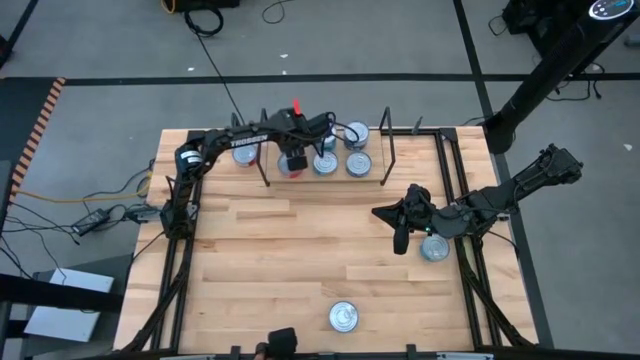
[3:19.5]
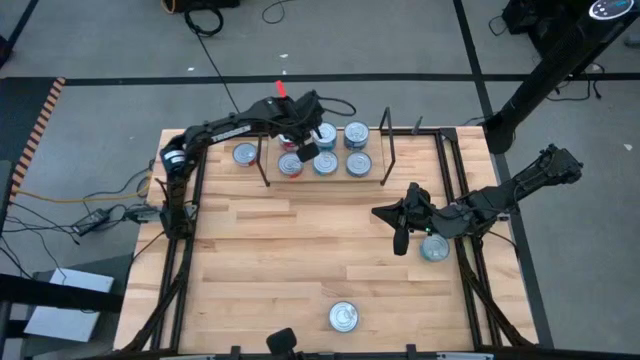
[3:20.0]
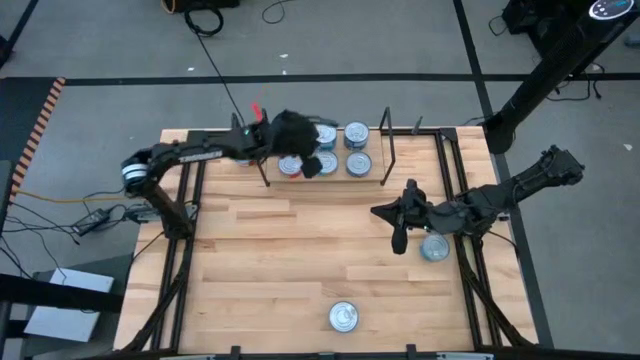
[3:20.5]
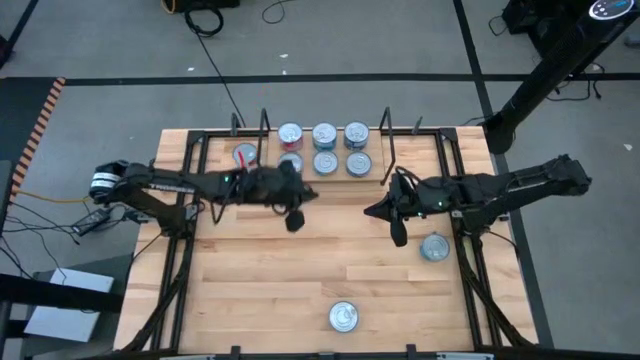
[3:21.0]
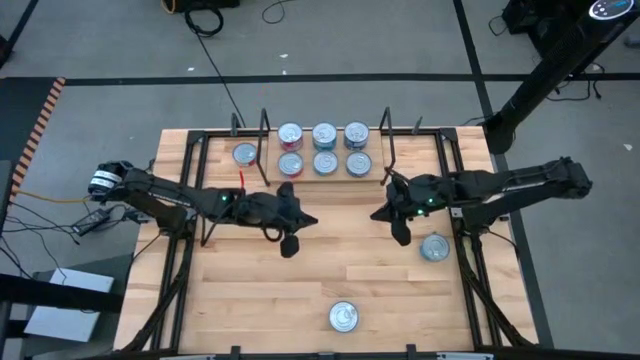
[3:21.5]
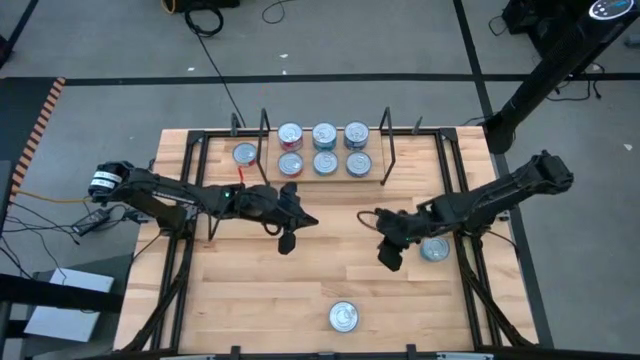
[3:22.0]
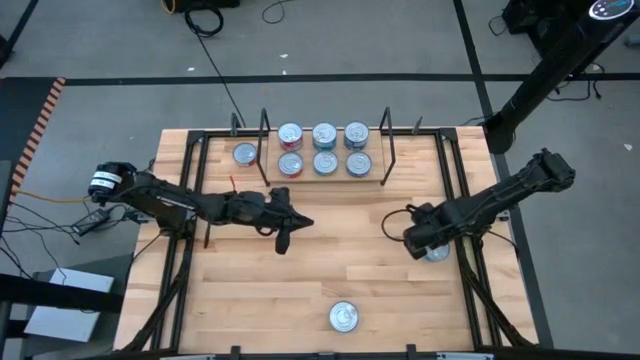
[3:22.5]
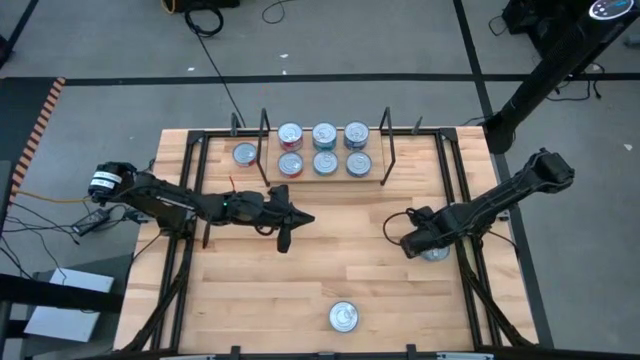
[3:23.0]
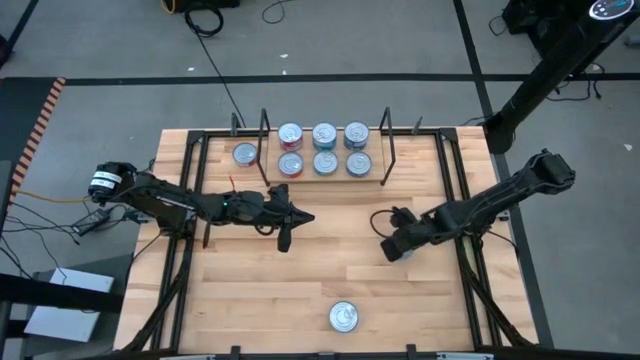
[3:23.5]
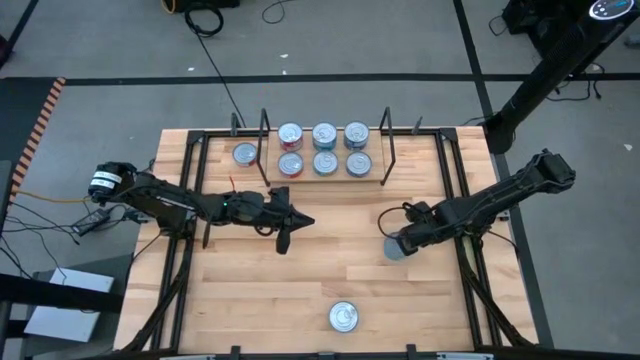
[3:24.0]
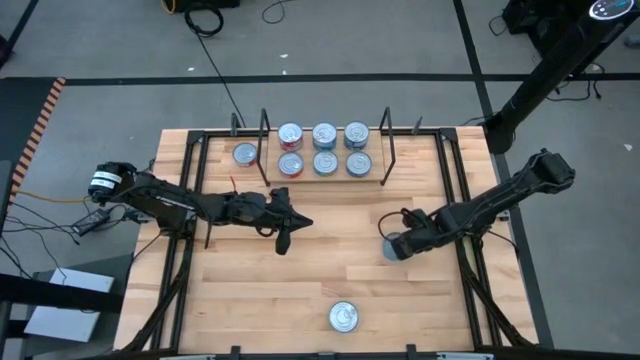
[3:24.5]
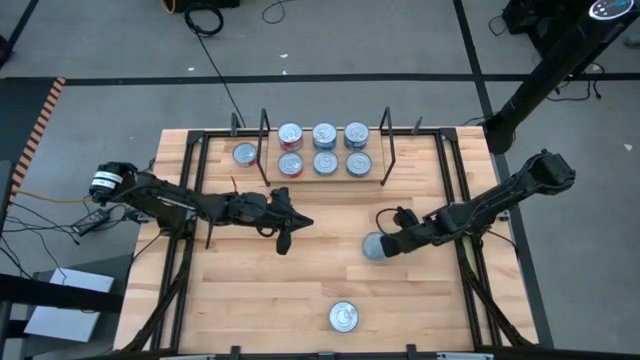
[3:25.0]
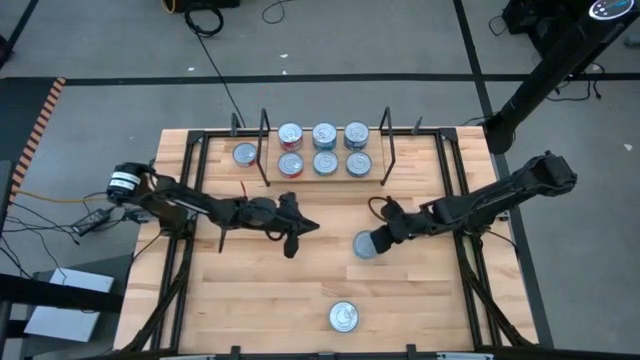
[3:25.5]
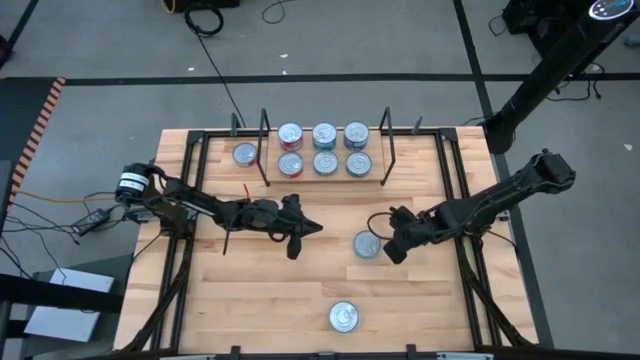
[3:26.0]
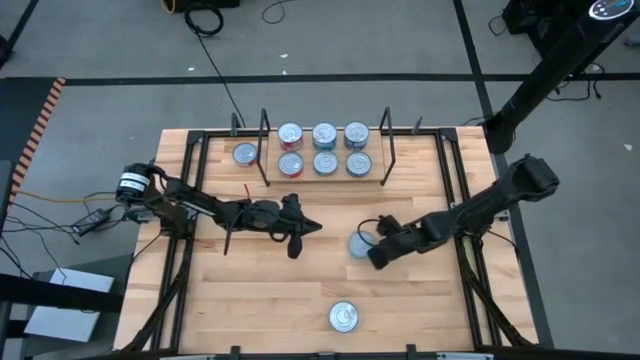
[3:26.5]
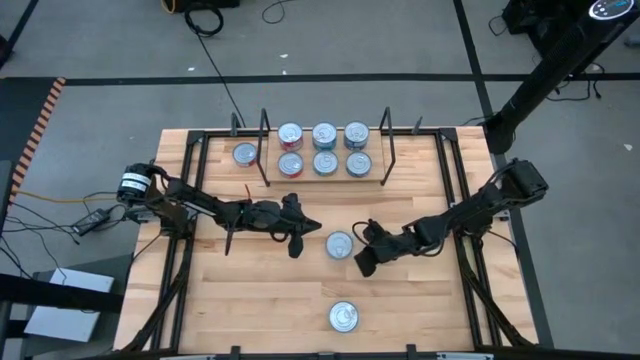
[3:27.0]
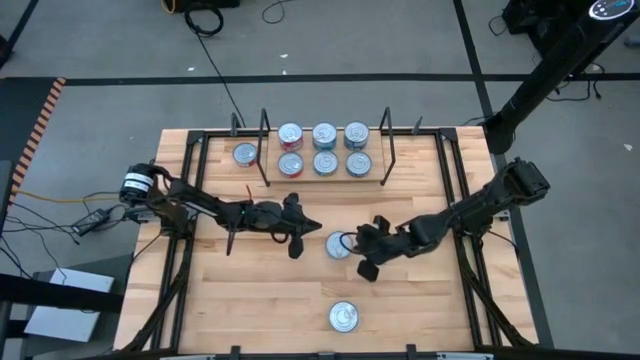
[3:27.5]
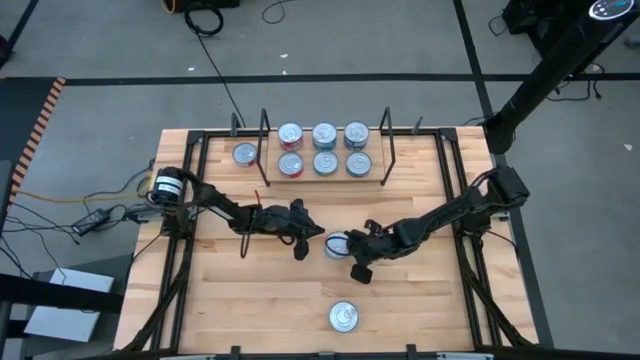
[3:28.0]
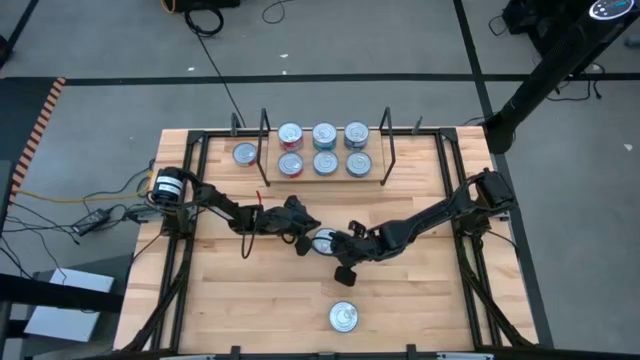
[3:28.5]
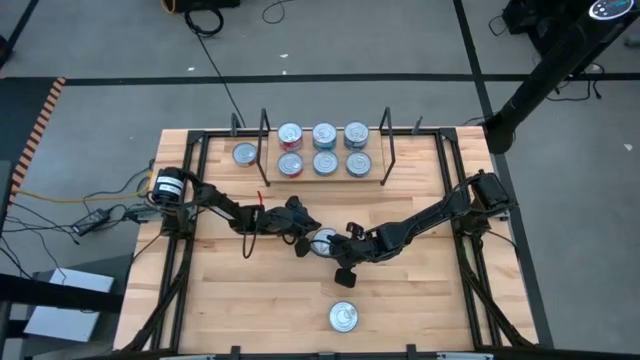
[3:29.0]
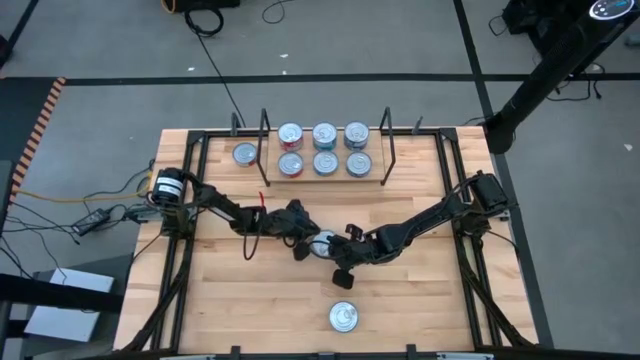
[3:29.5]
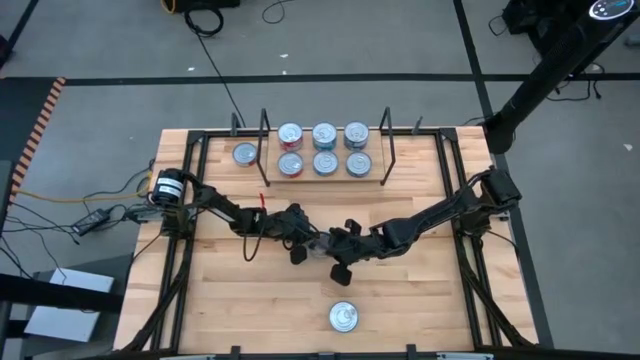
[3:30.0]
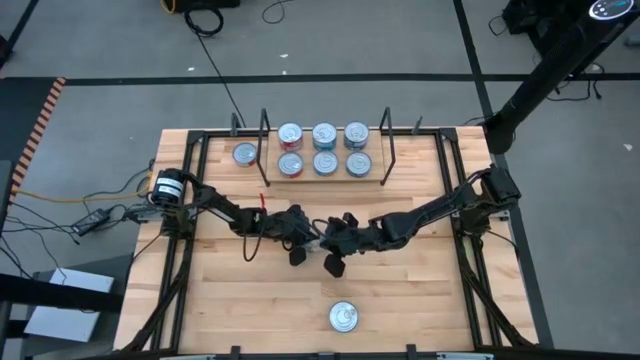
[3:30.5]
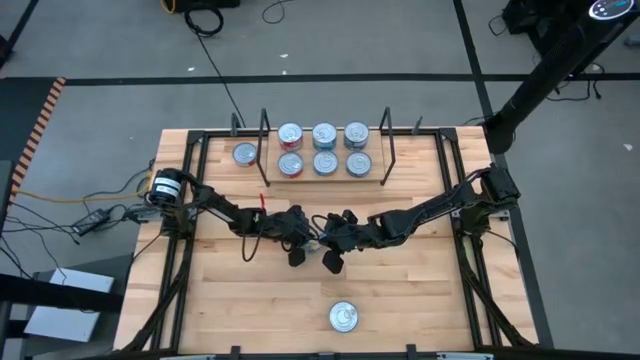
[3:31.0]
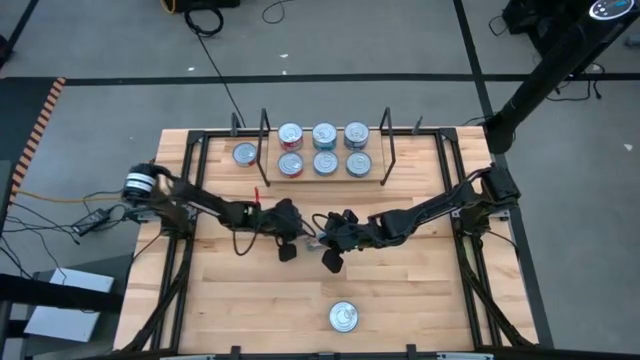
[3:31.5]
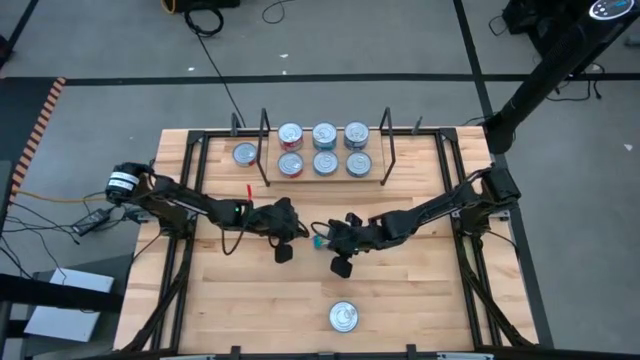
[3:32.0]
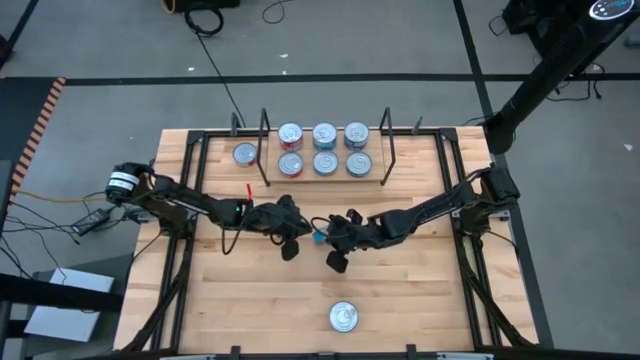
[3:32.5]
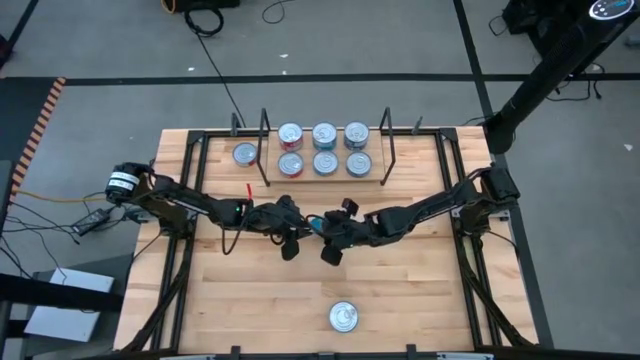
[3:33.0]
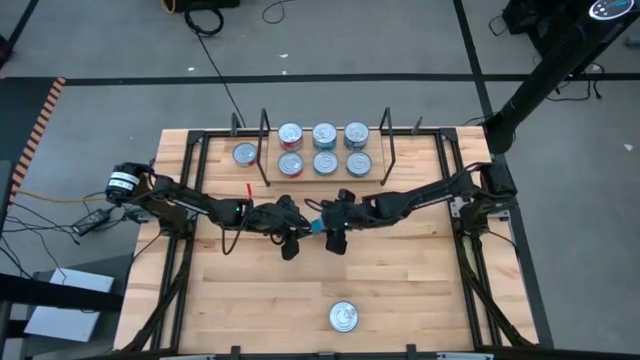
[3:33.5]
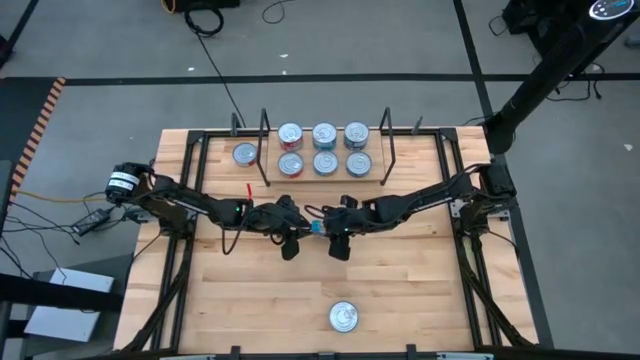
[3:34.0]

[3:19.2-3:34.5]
Task: Stack canned seafood by type on shelf
Stack the light blue tuna can on top of the other light blue tuna can

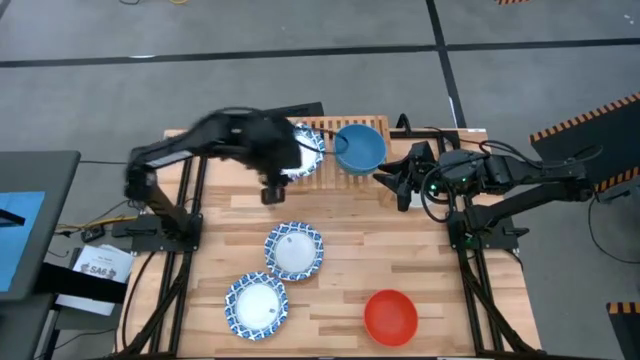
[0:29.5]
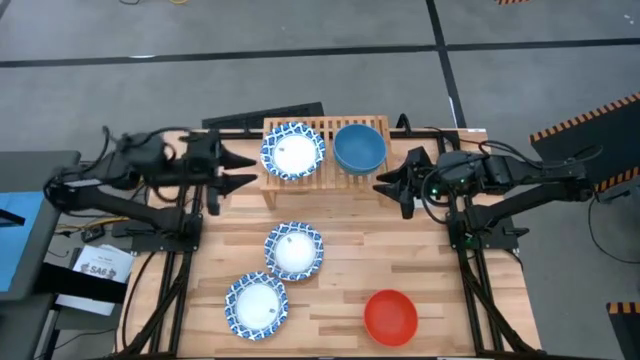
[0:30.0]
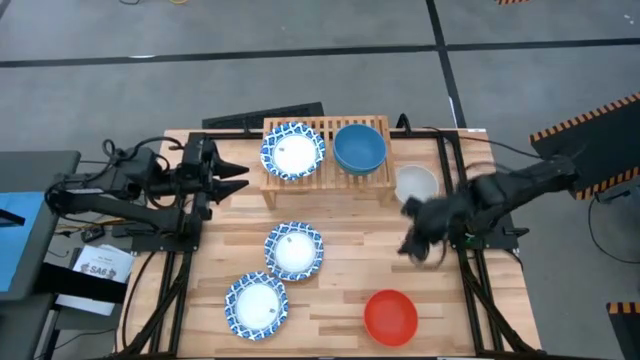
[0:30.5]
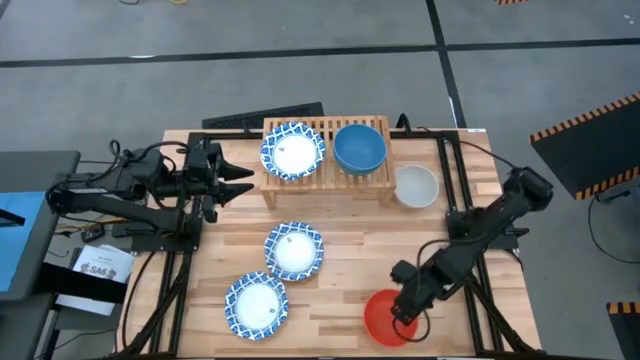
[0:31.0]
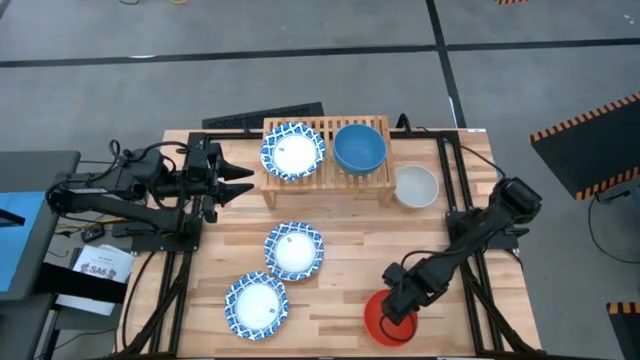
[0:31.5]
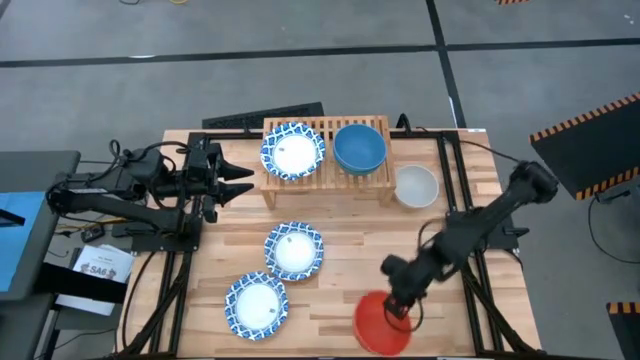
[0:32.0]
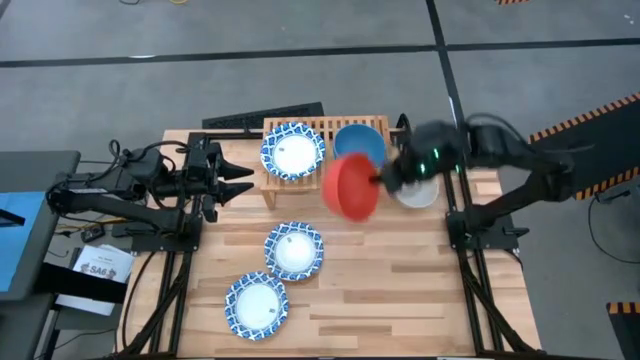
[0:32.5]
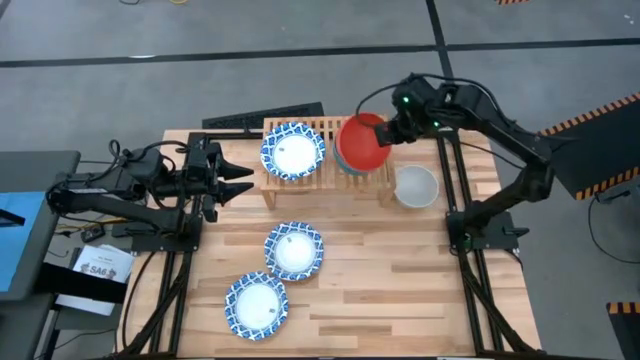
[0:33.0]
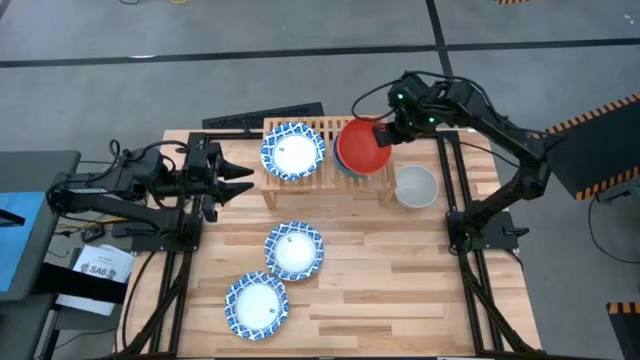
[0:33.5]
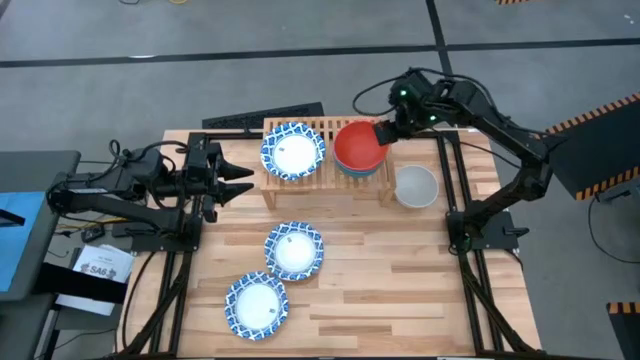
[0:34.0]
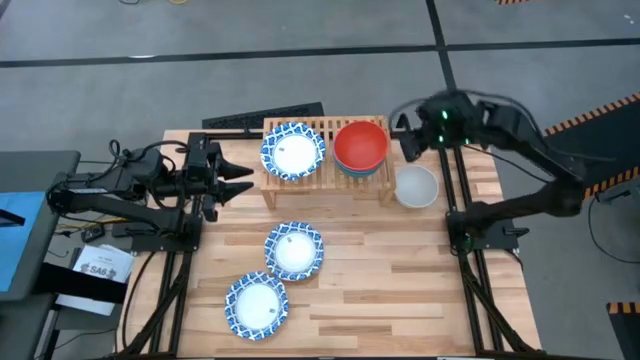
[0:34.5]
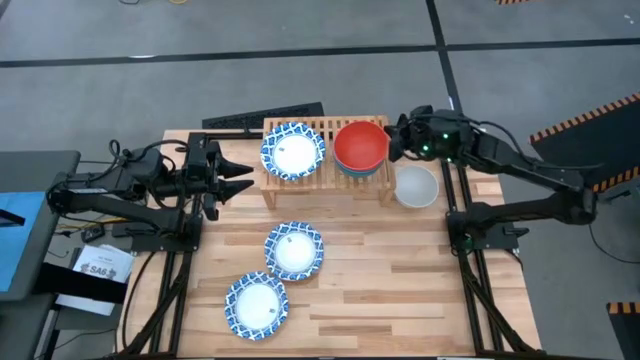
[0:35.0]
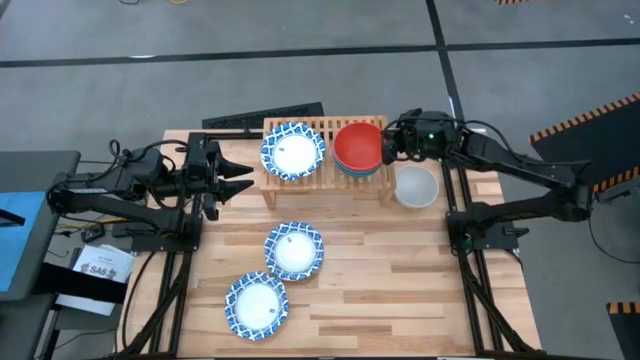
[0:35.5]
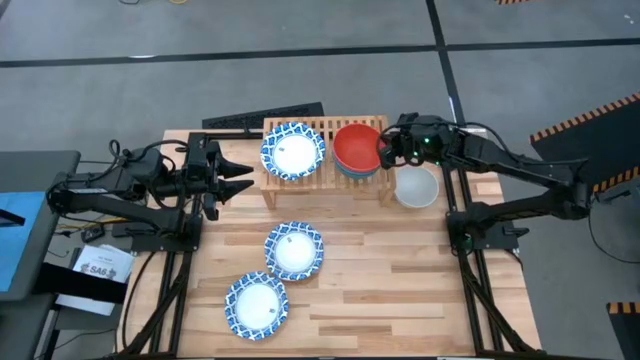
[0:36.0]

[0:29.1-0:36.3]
Task: Place and stack bowls onto a shelf
Stack the orange bowl on top of the blue bowl on the shelf

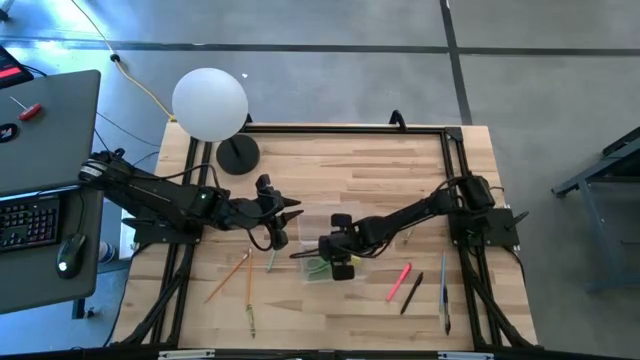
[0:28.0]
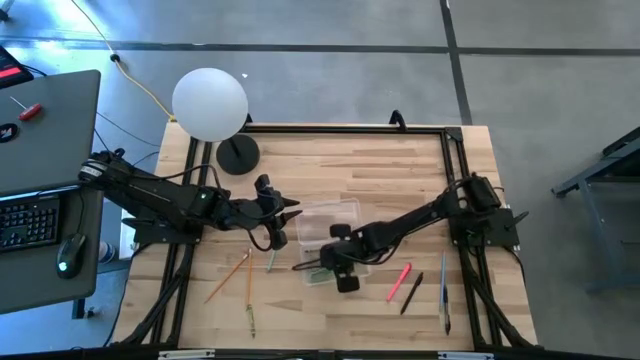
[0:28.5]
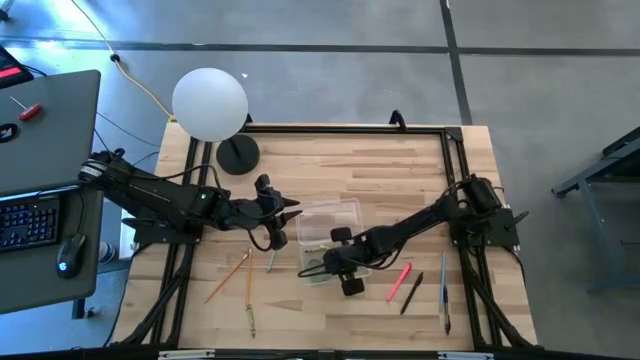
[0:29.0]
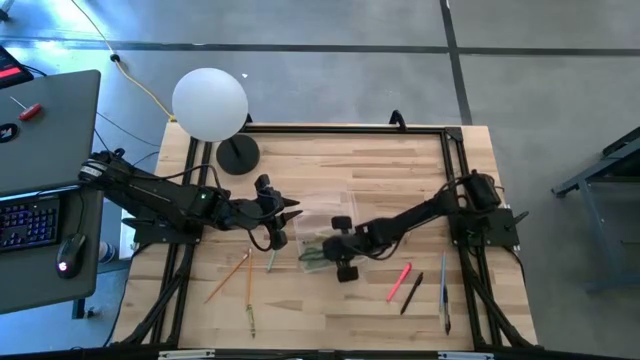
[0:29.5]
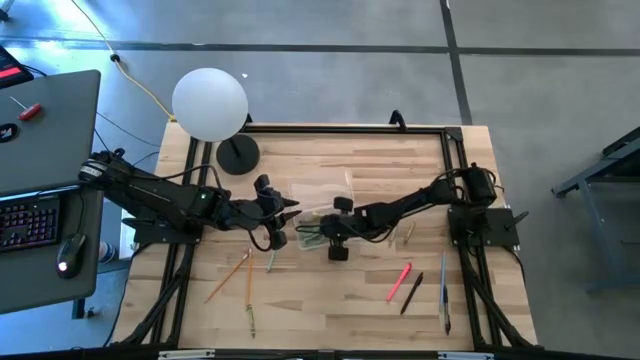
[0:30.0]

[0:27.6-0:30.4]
Task: Pick & place school supplies into a supply box
Adjust the transparent supply box
